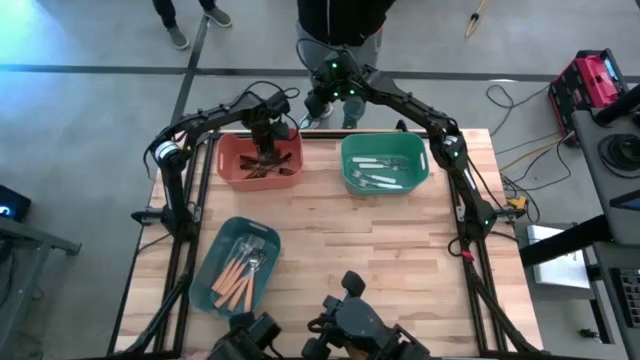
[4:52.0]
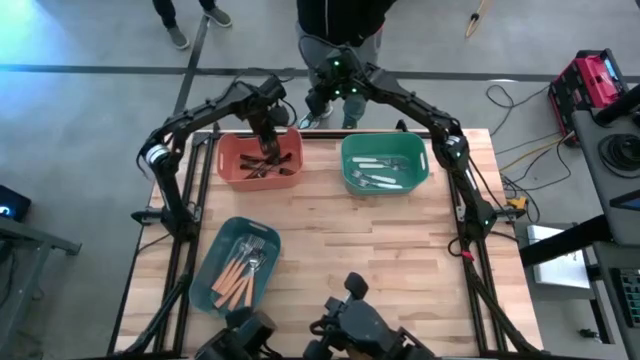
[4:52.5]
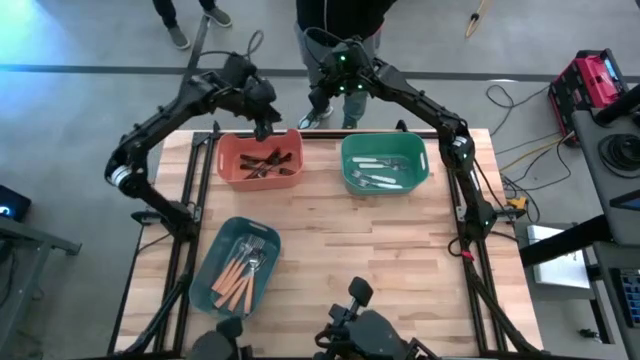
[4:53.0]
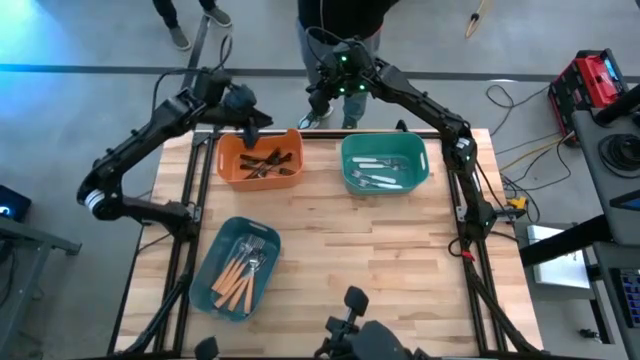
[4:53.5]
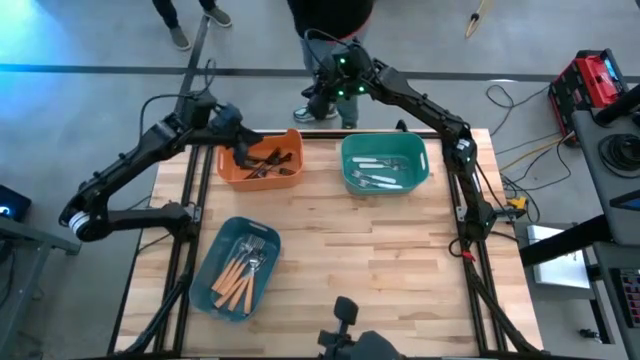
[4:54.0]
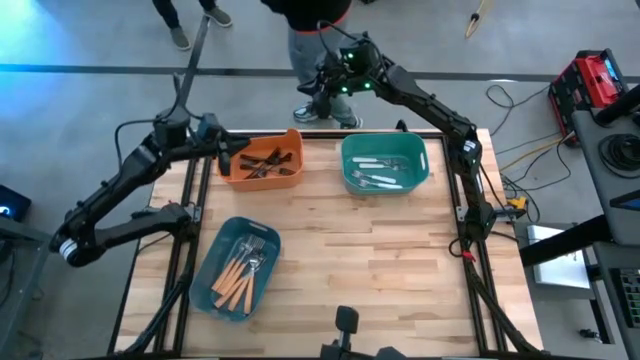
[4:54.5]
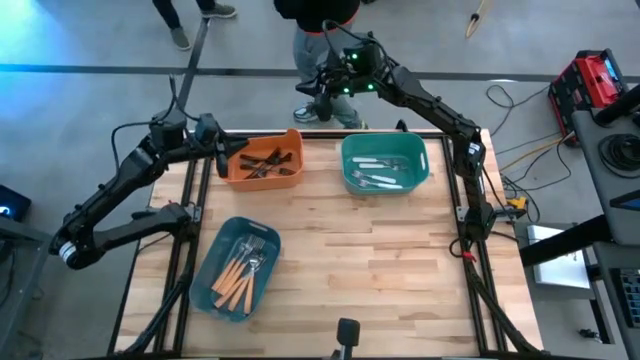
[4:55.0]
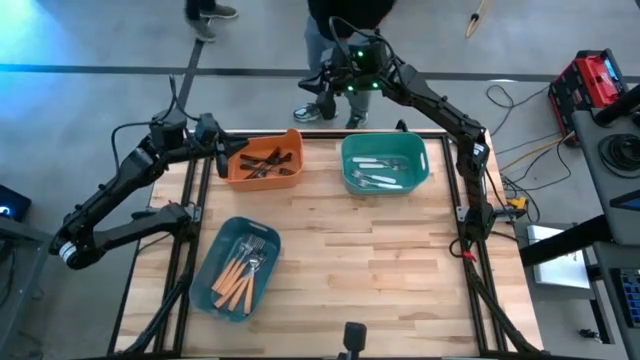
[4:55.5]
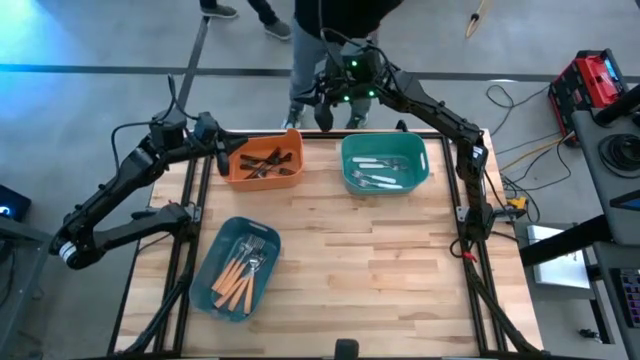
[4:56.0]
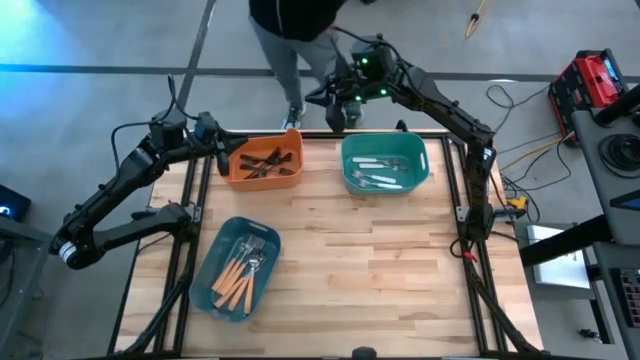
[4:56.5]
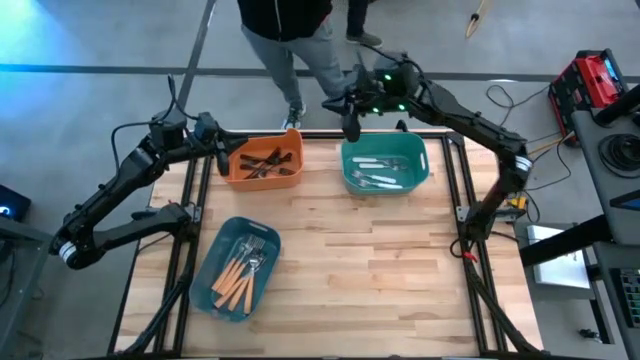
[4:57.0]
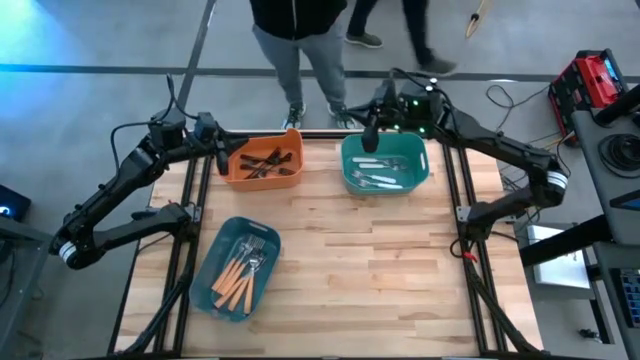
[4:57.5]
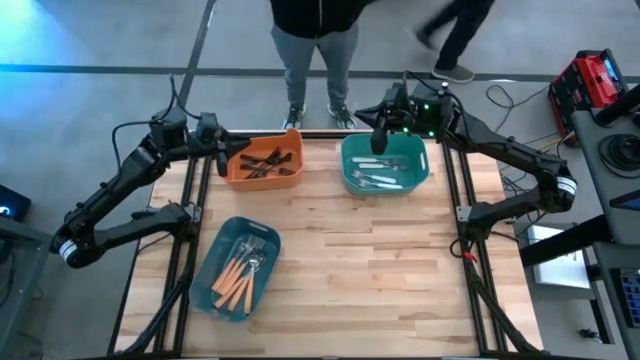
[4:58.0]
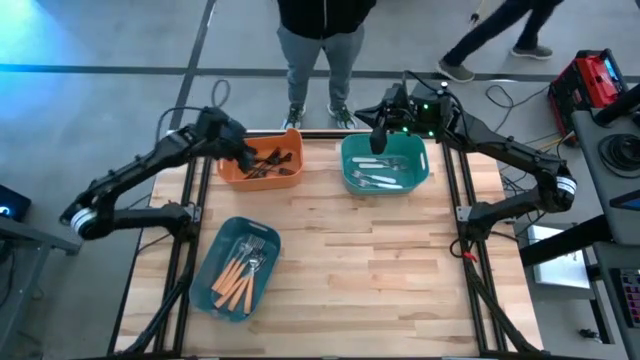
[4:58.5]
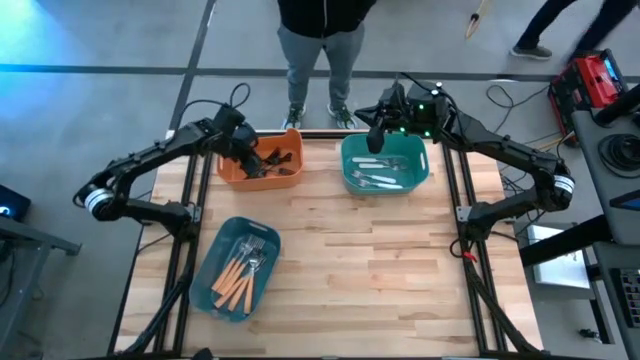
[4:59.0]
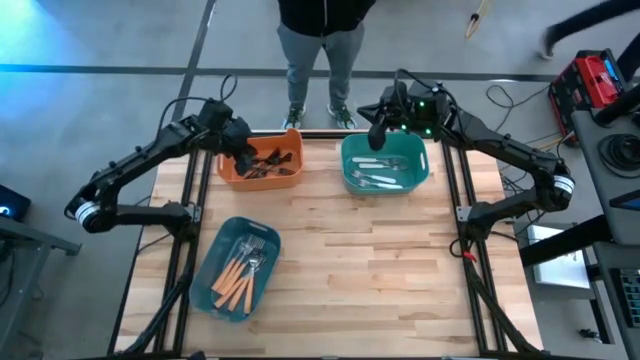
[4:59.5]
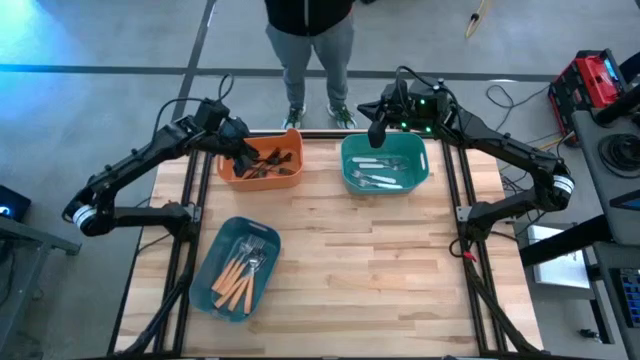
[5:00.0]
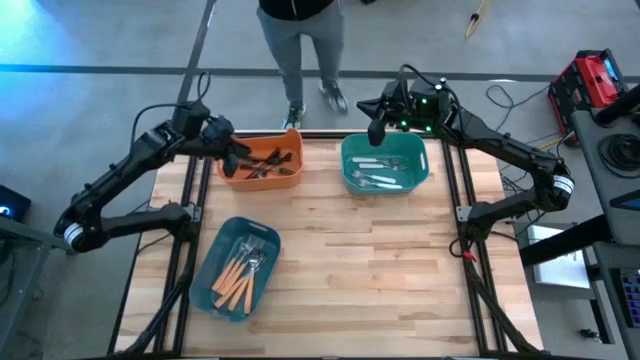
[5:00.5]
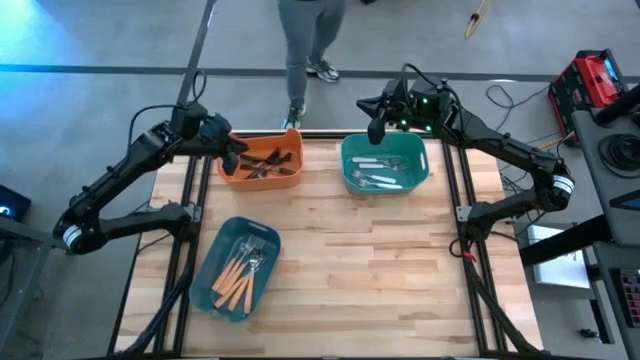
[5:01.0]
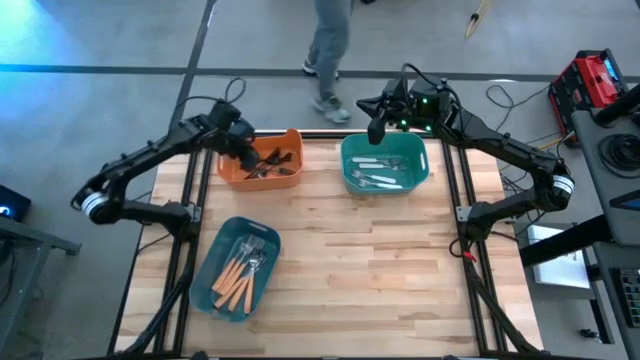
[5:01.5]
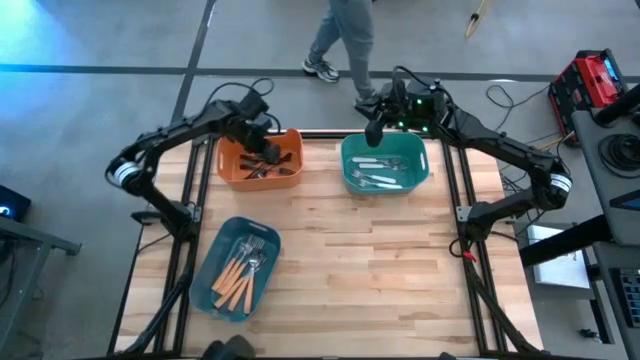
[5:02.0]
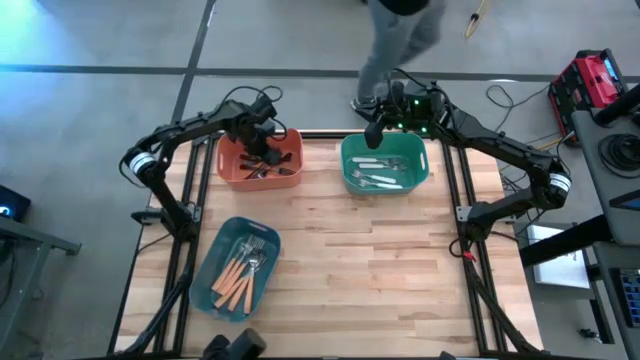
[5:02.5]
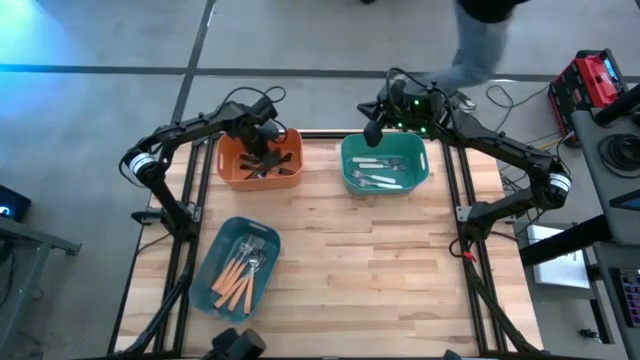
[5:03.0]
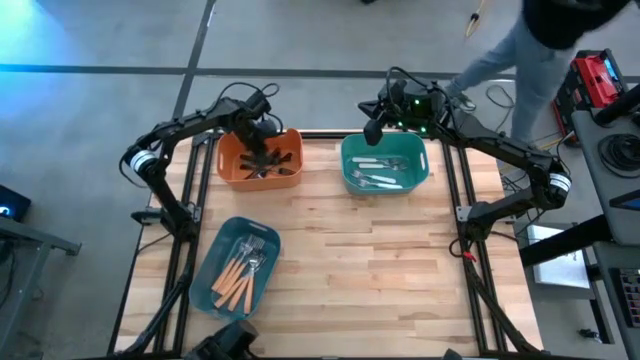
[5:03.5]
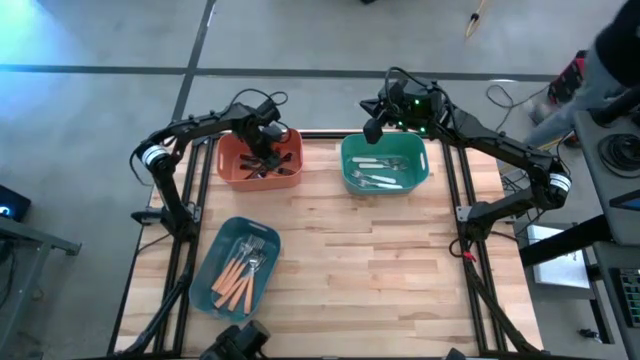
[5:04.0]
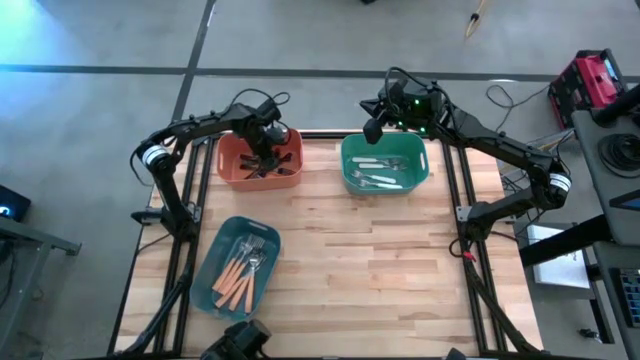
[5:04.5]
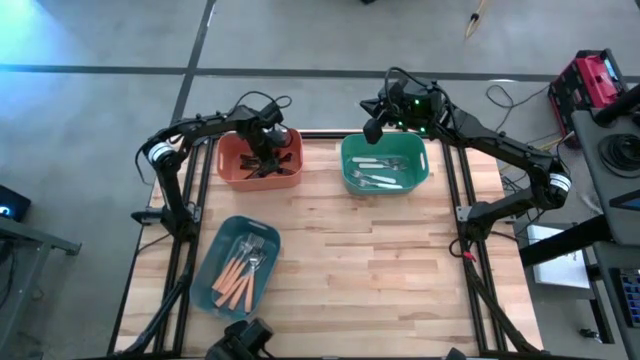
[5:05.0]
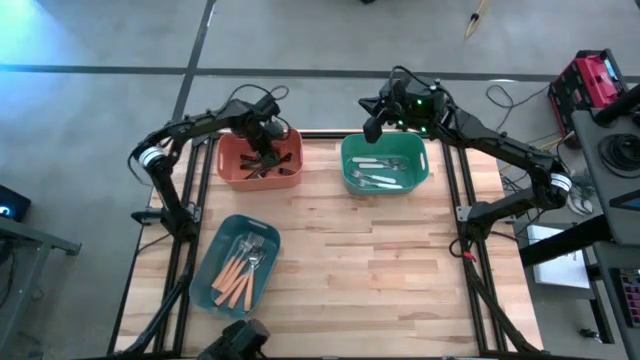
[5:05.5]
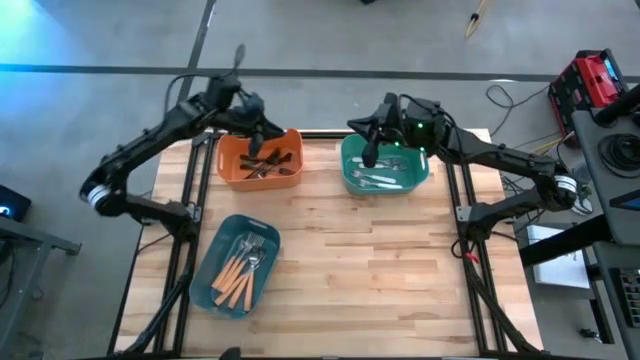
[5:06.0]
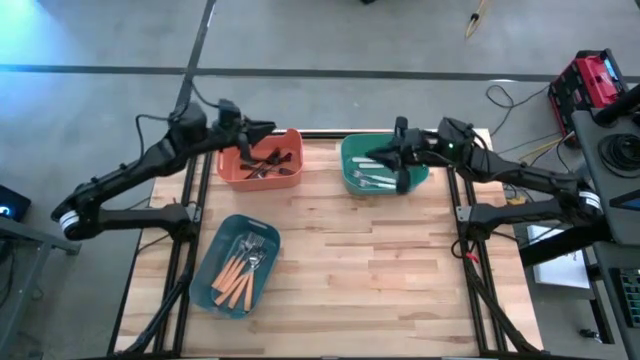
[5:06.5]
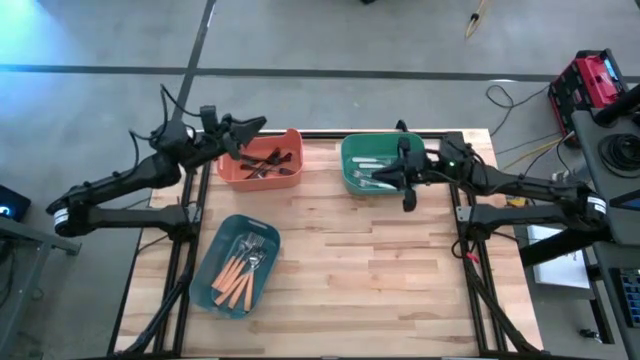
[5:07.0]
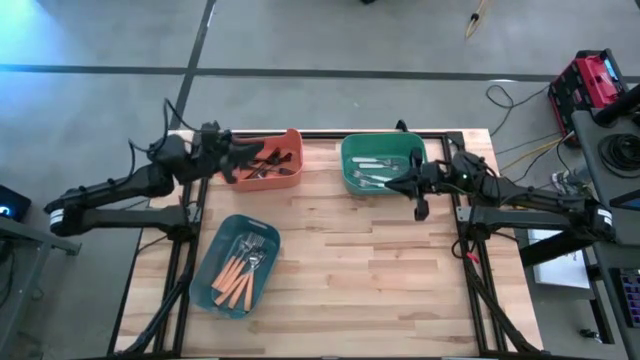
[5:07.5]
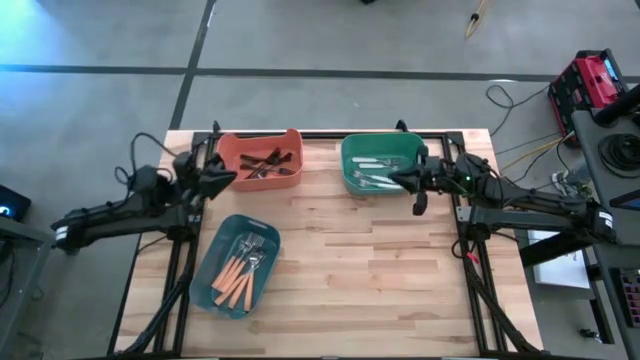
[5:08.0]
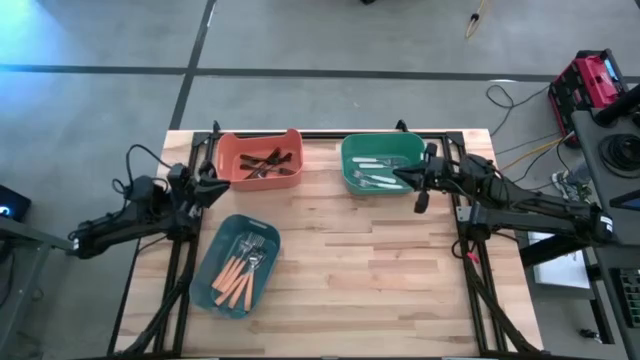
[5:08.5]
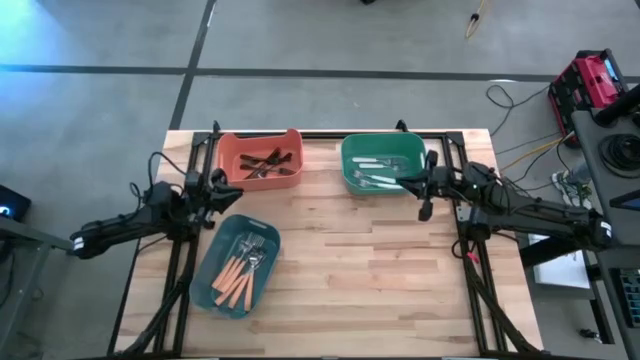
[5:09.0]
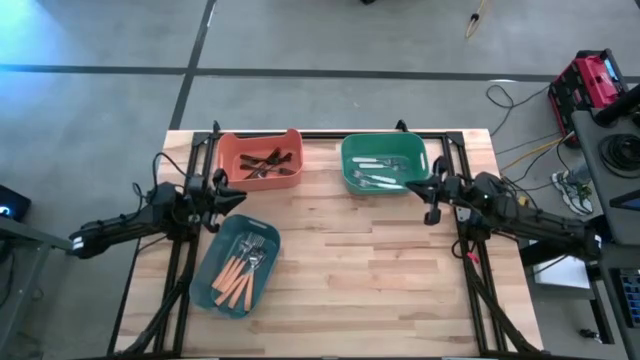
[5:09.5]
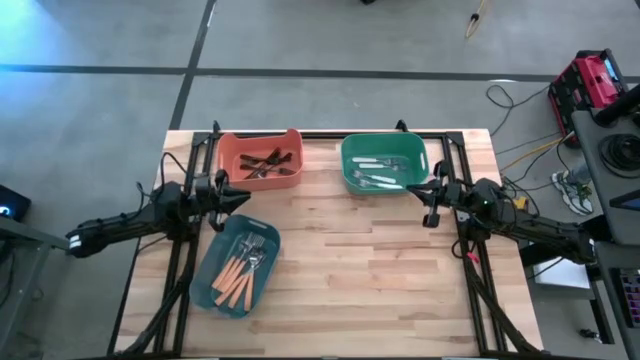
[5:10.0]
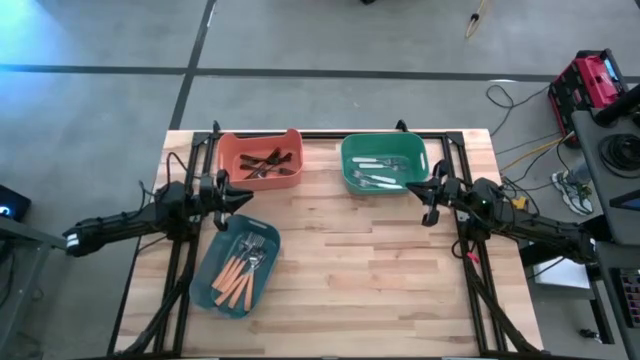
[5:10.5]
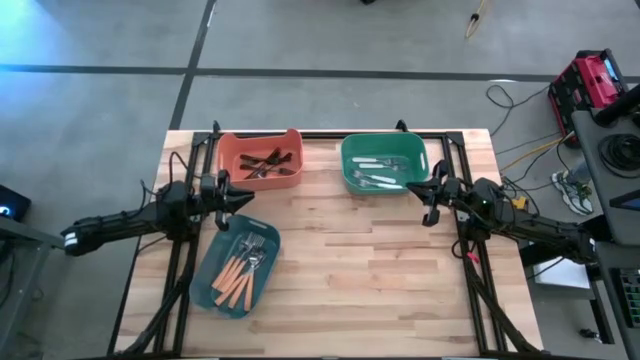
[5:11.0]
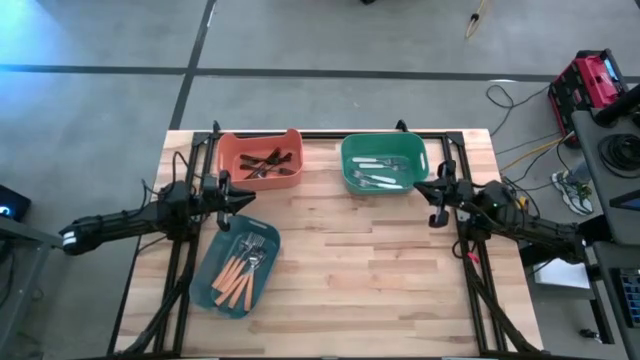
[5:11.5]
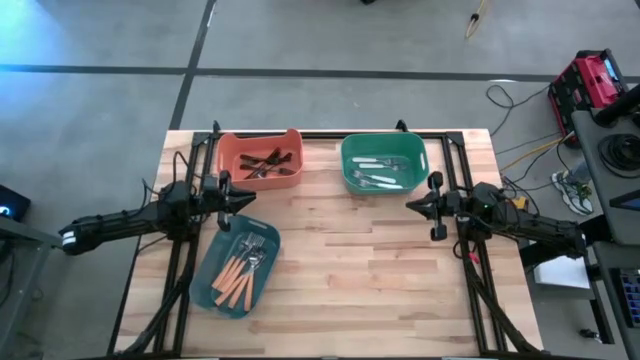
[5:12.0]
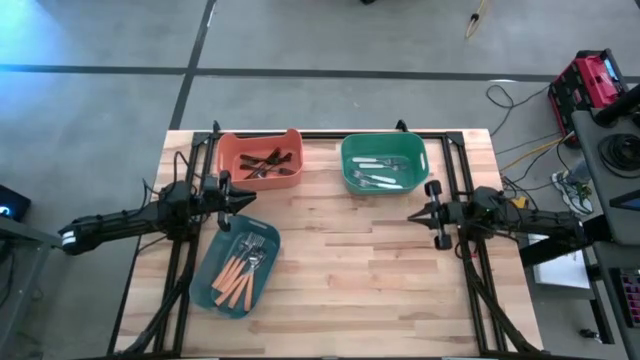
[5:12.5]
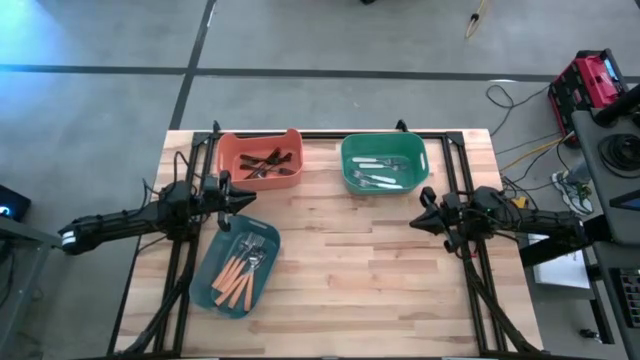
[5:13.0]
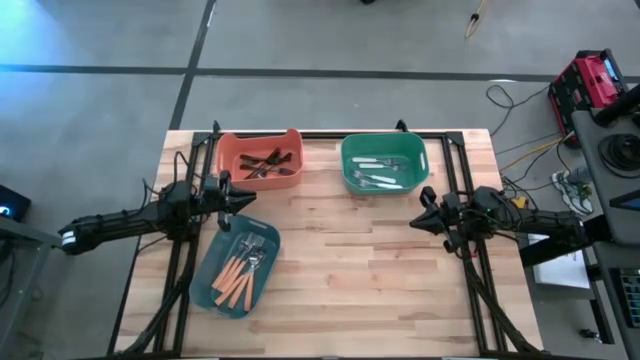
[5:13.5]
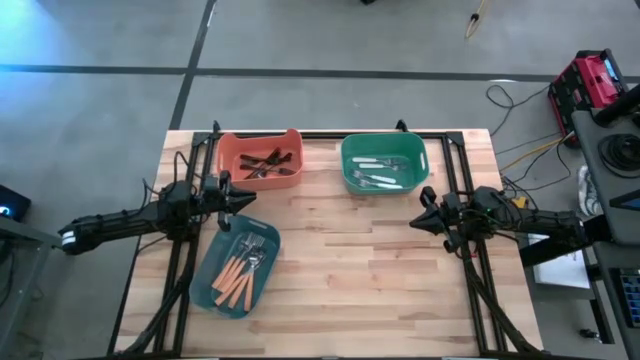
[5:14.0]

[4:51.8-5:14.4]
Task: Sort silverware by color (type)
Return to Home Position
